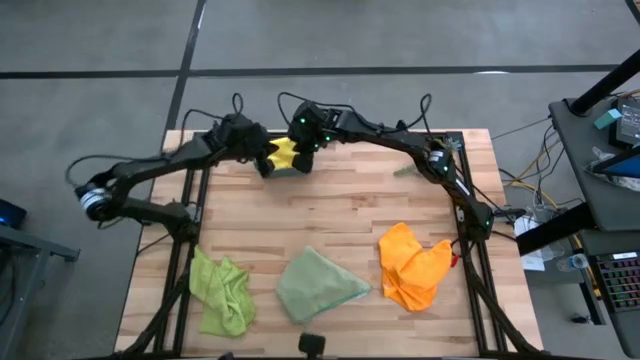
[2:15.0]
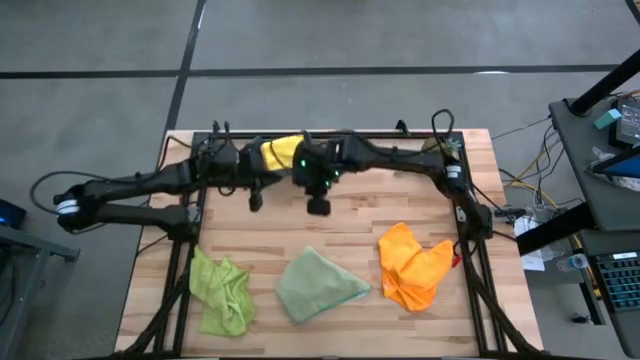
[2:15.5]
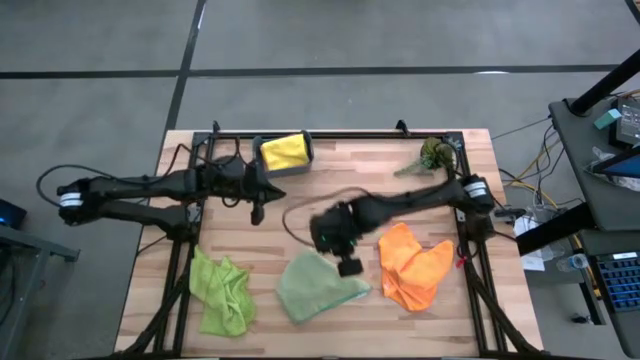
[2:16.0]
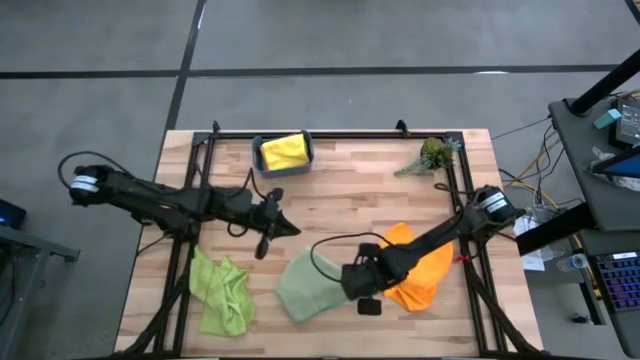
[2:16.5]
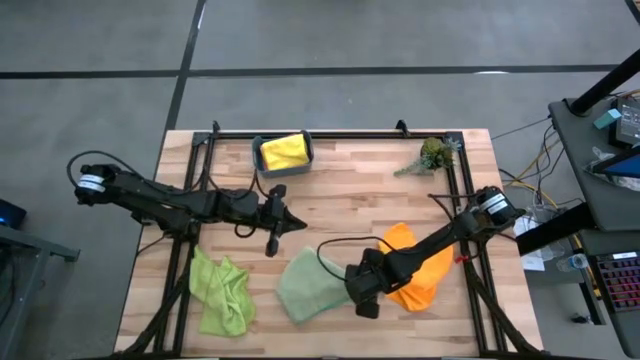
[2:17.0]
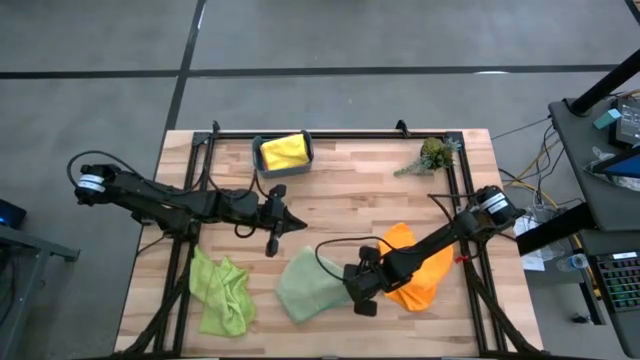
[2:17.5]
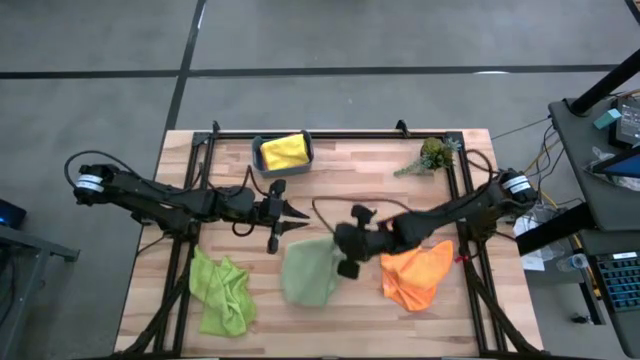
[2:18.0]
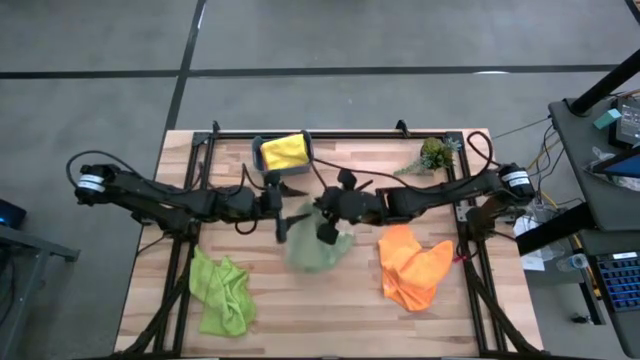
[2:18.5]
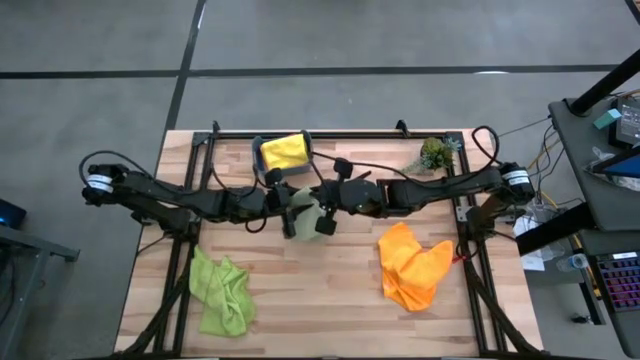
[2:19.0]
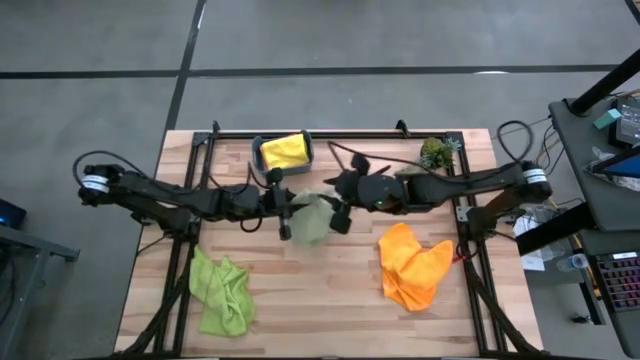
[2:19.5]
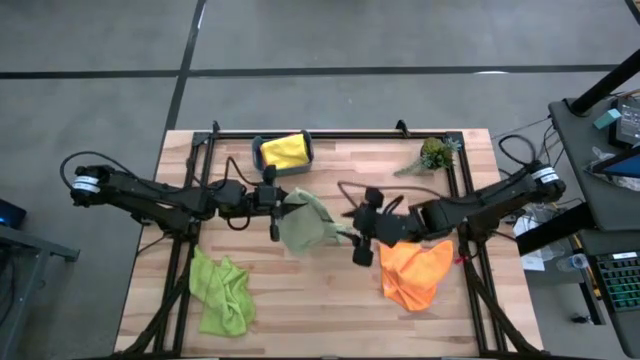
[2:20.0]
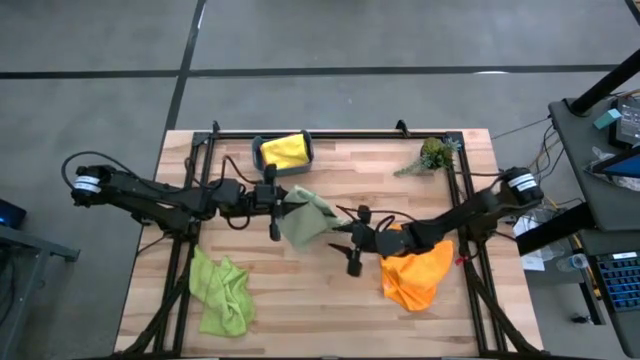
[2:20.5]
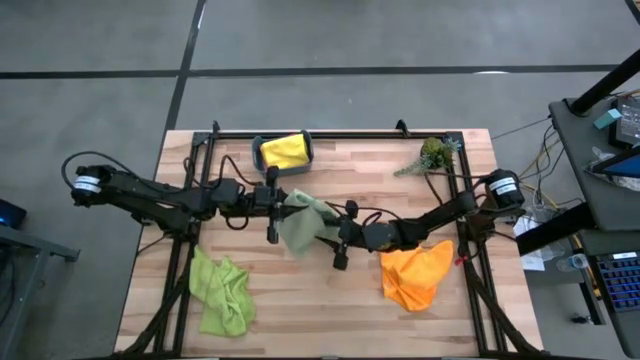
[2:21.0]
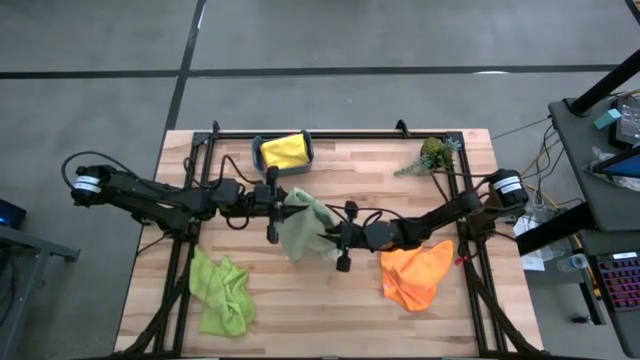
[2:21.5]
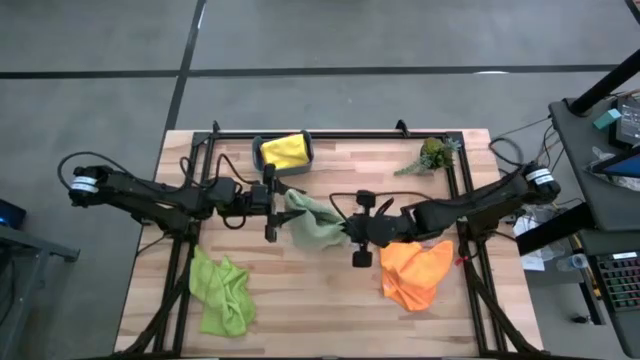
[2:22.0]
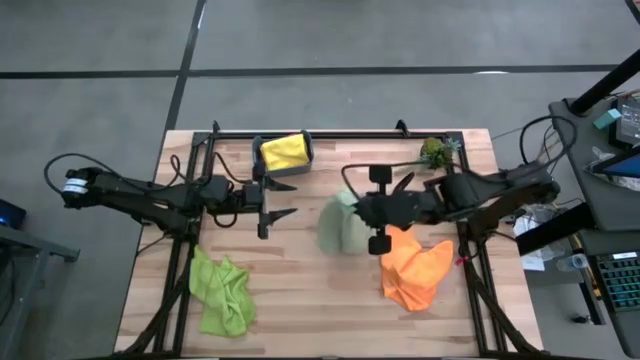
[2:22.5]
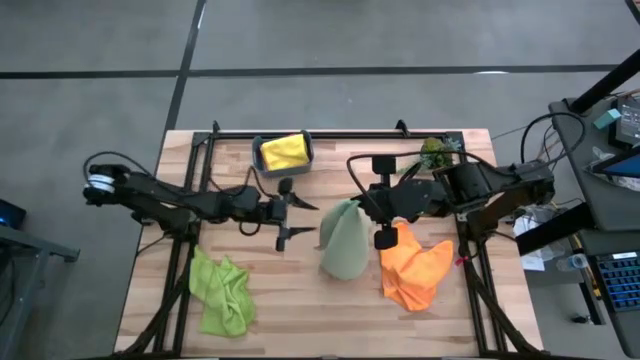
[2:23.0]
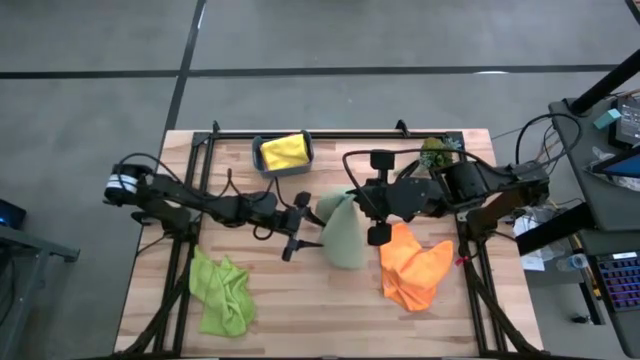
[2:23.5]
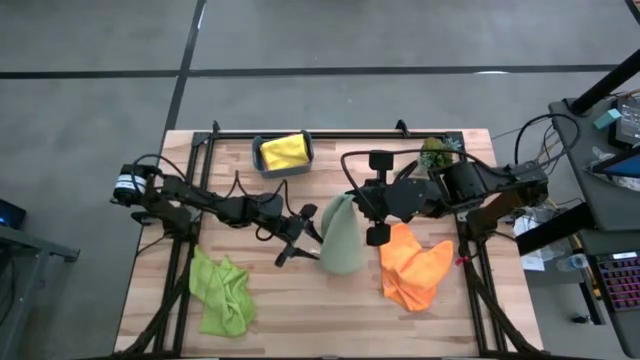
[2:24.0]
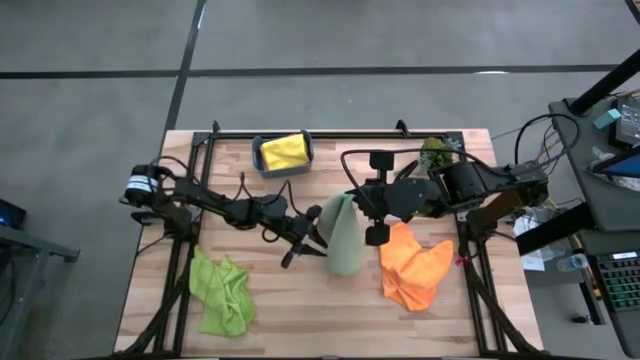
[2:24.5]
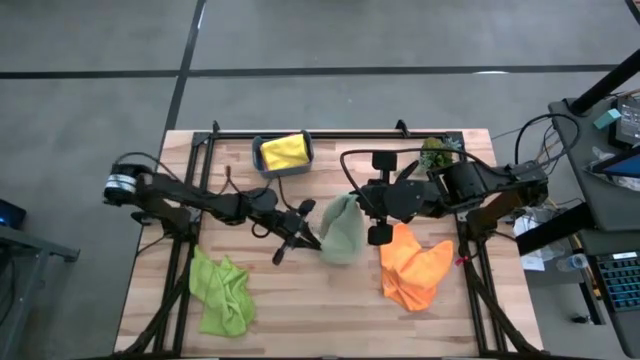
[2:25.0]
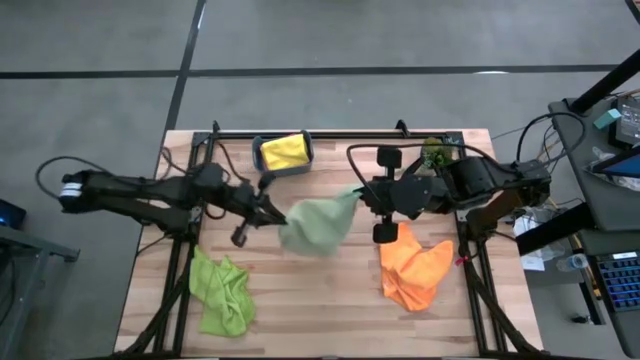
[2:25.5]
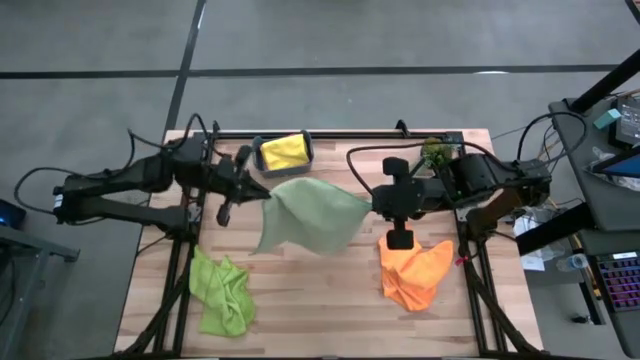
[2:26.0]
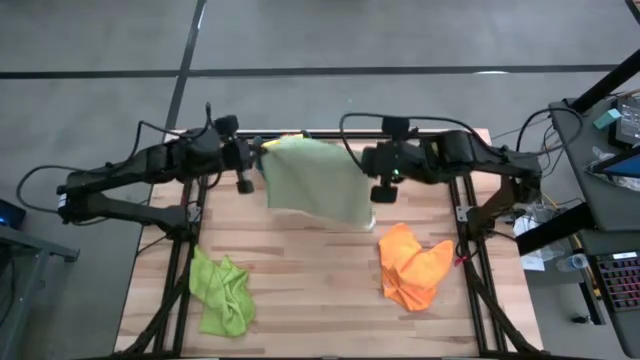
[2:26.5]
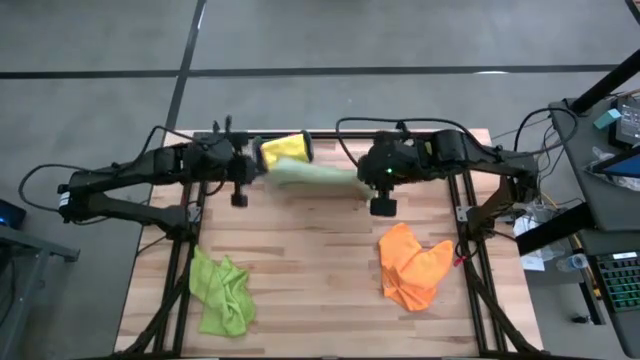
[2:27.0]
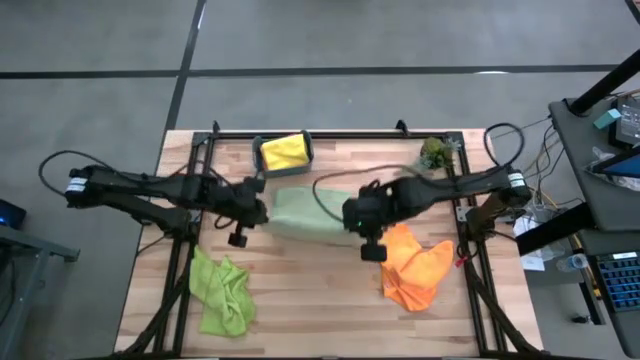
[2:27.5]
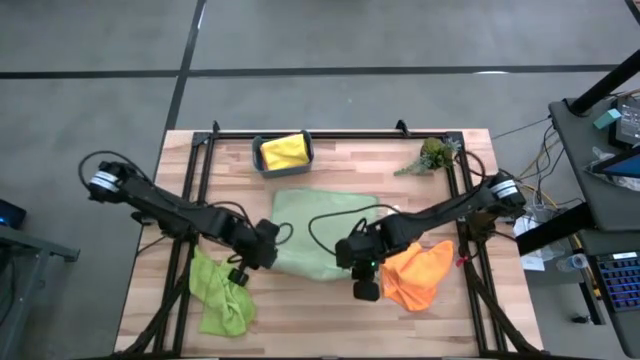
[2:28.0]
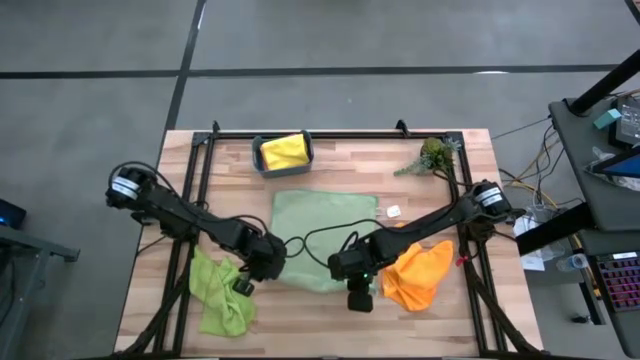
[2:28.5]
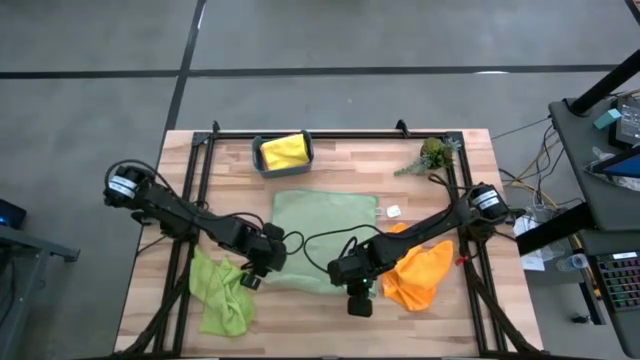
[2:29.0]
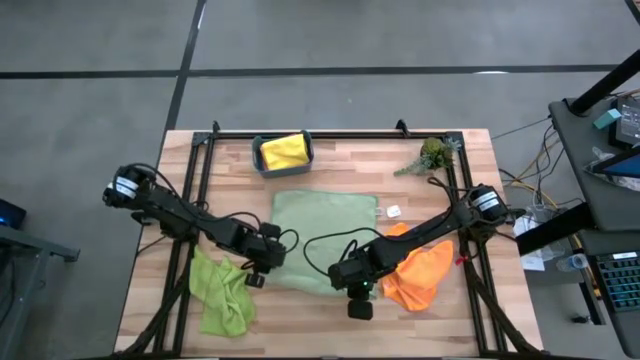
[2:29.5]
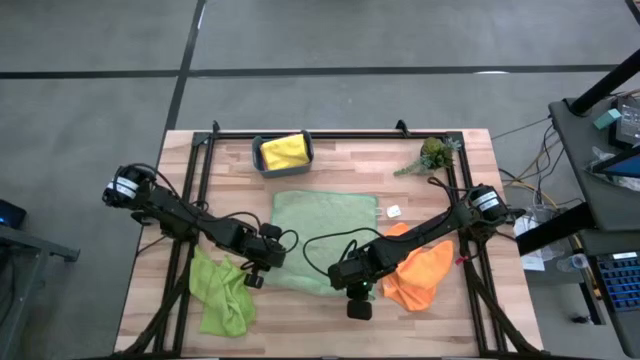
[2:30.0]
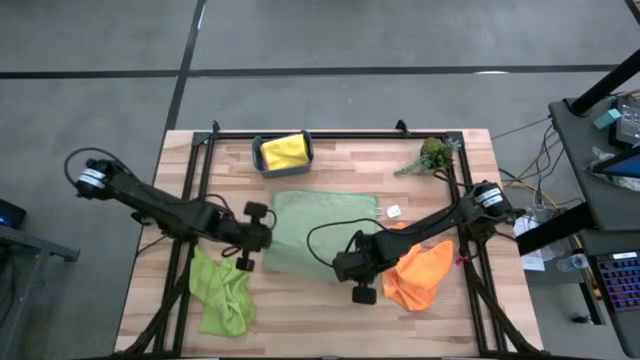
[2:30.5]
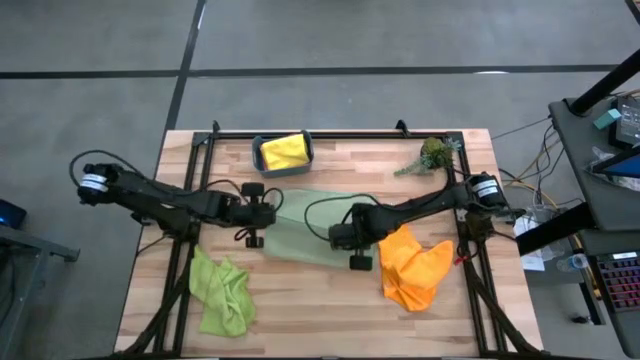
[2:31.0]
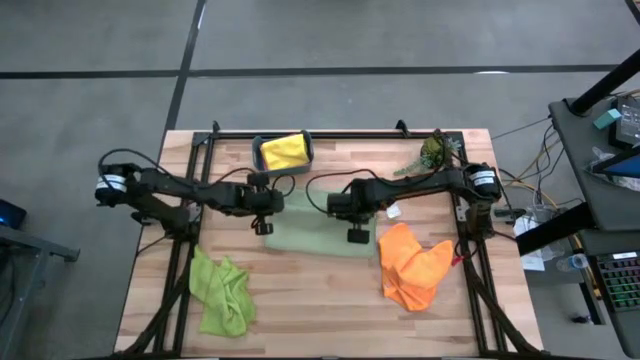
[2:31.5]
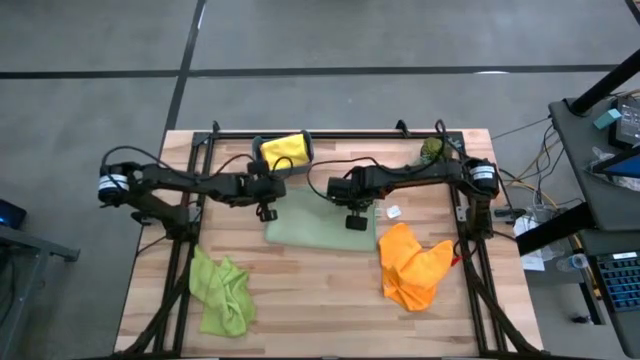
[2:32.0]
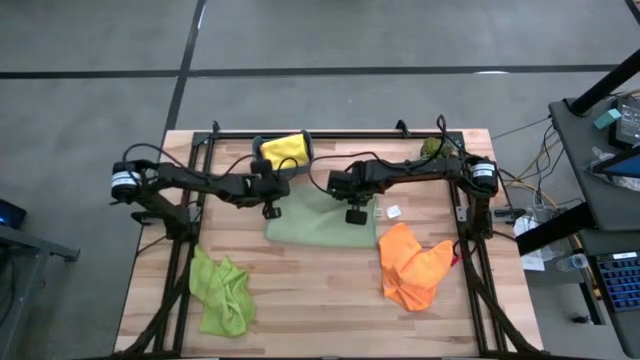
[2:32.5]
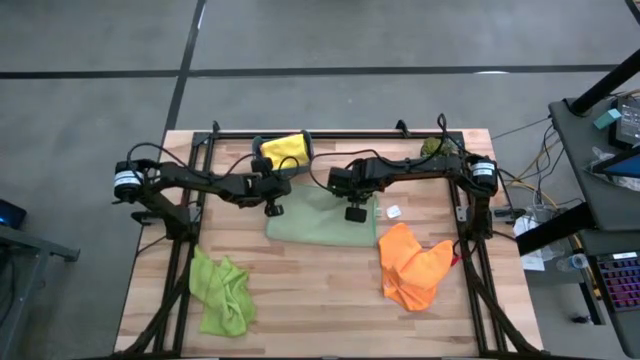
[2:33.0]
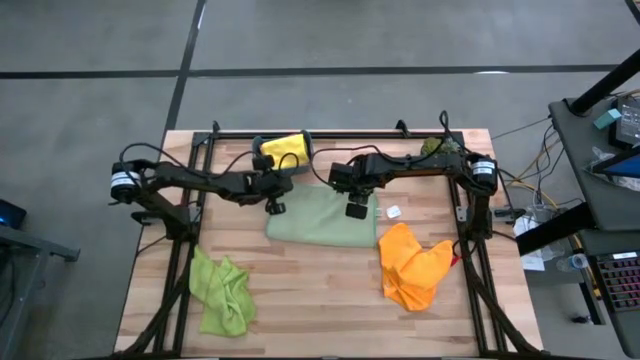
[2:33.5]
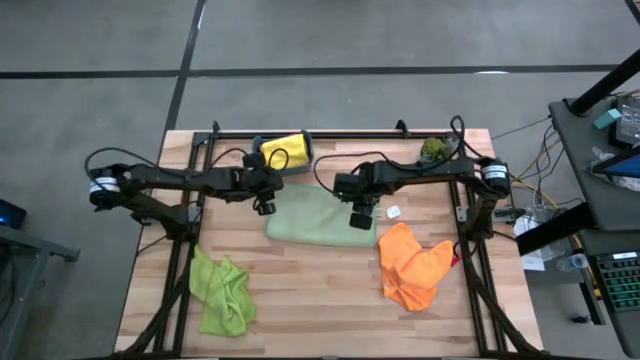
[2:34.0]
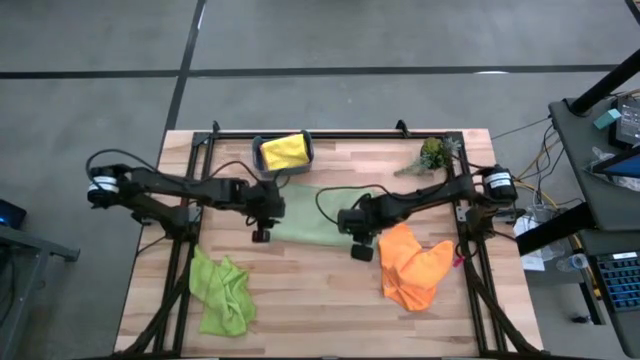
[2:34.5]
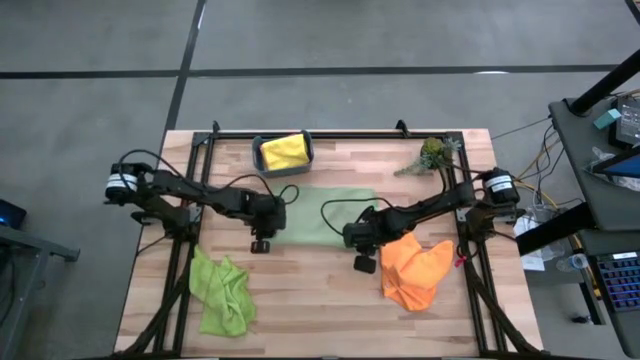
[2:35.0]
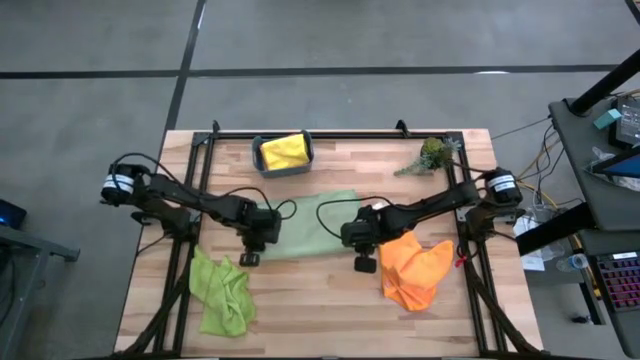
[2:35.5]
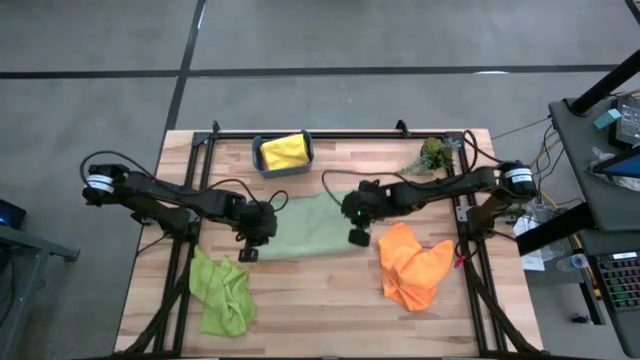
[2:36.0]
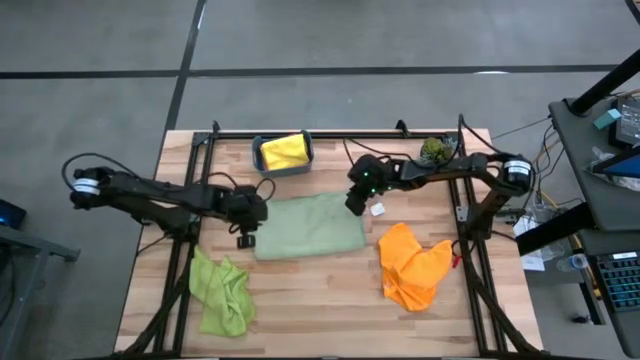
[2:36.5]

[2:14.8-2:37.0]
Task: Fold microfiber towels
Fold the green microfiber towel

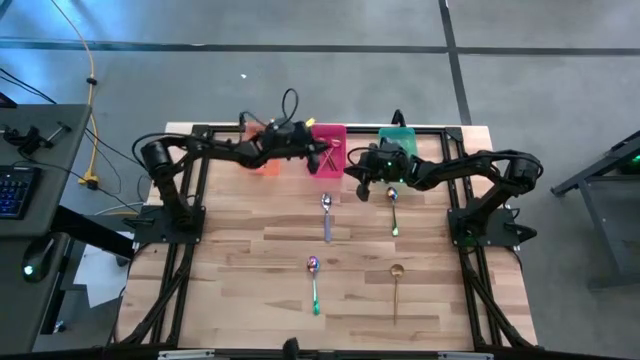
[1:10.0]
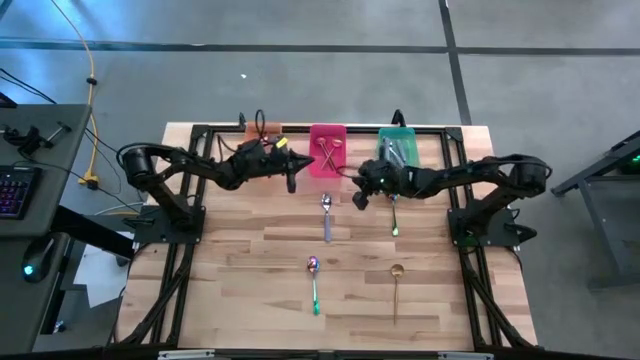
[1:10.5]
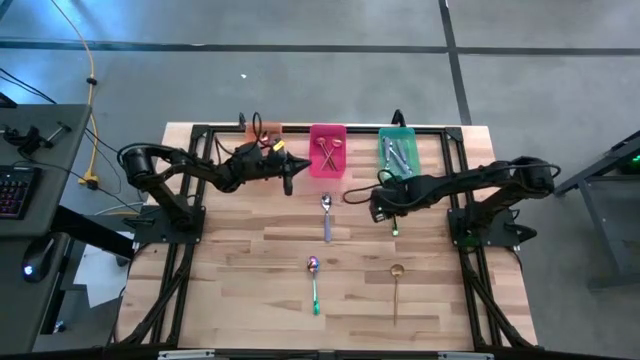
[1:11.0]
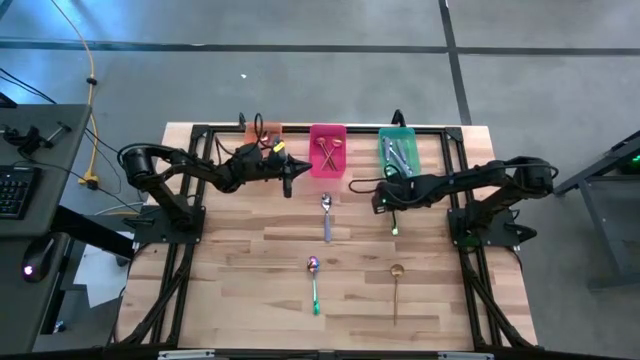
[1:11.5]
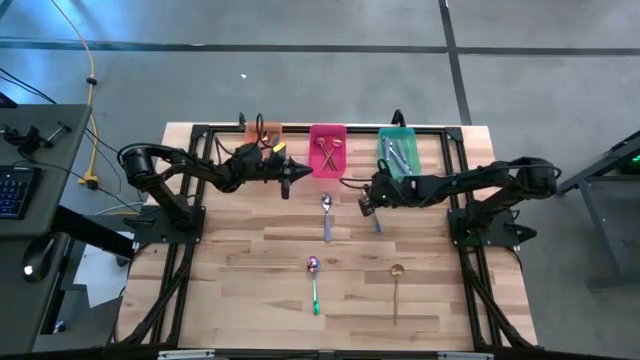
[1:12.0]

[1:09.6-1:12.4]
Task: Sort silverware by color (type)
Put the top iridescent spoon into the orange bin
